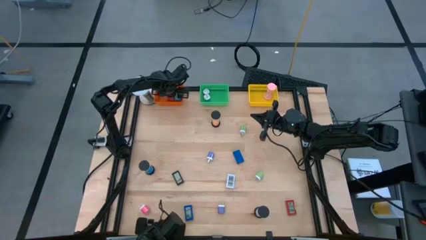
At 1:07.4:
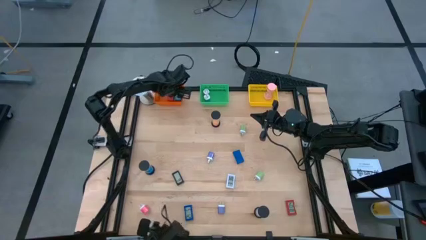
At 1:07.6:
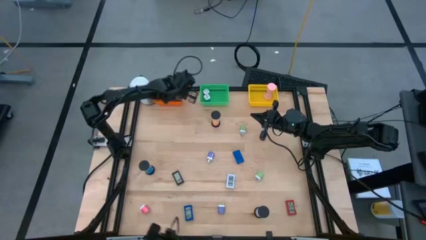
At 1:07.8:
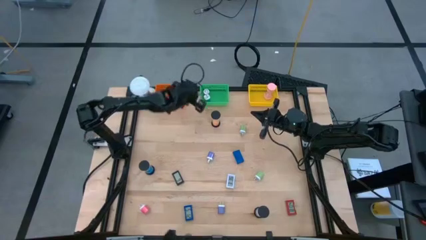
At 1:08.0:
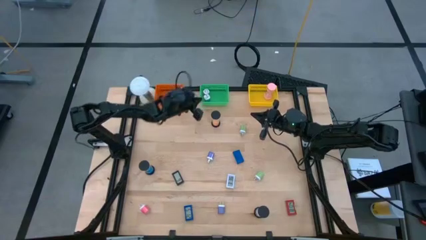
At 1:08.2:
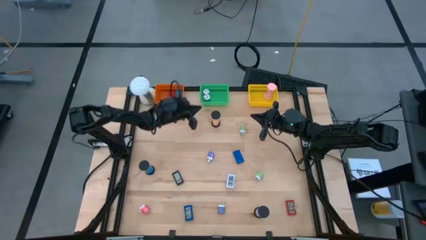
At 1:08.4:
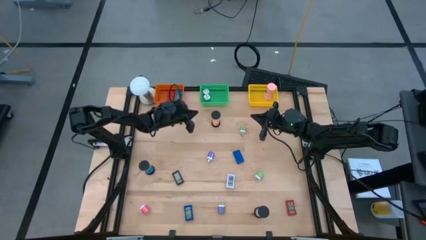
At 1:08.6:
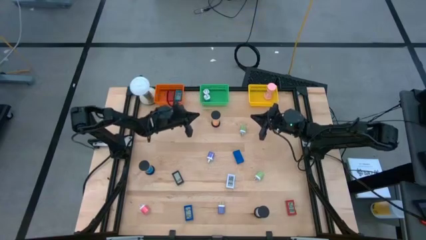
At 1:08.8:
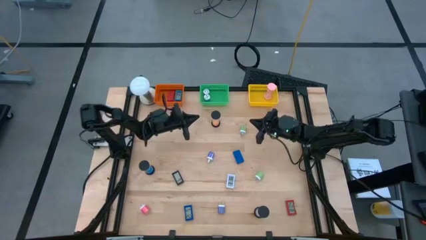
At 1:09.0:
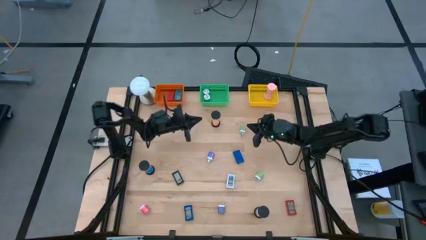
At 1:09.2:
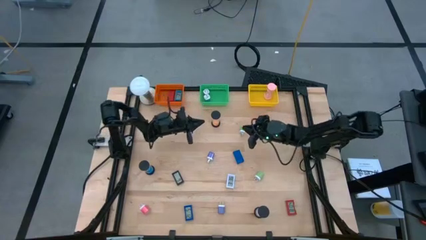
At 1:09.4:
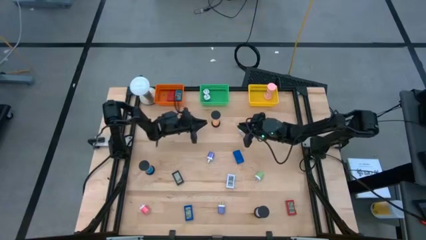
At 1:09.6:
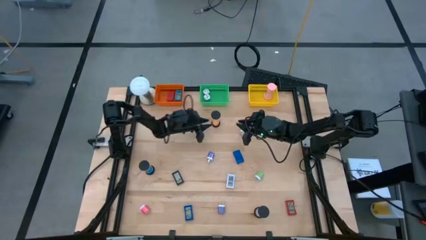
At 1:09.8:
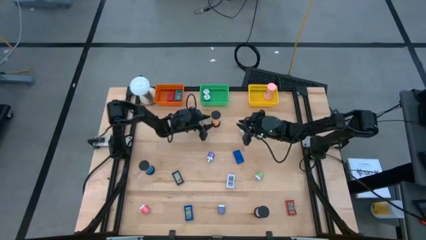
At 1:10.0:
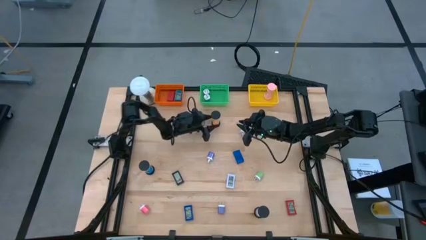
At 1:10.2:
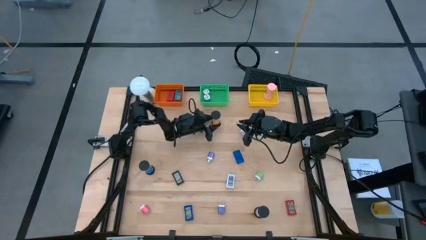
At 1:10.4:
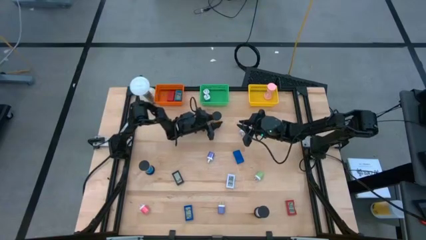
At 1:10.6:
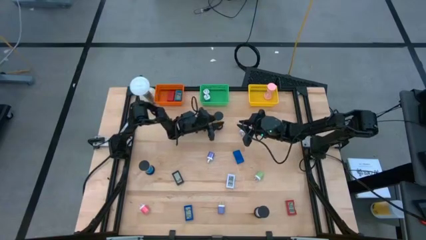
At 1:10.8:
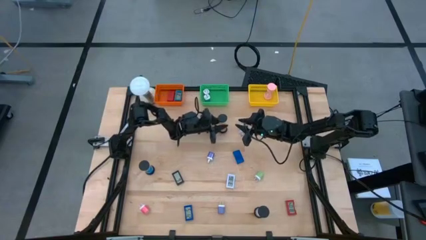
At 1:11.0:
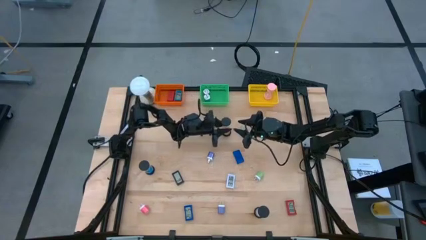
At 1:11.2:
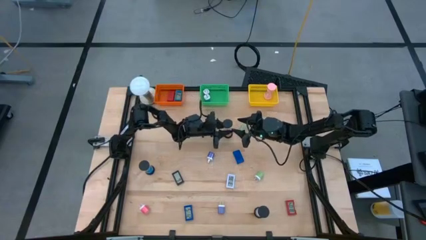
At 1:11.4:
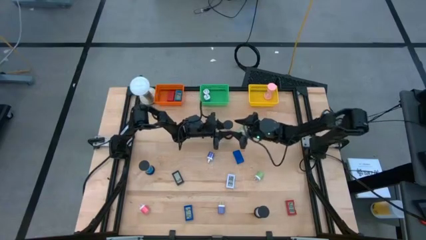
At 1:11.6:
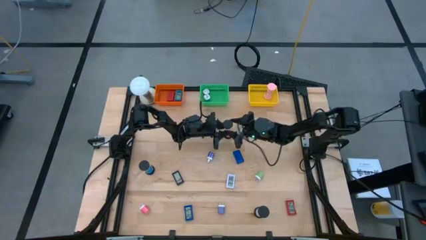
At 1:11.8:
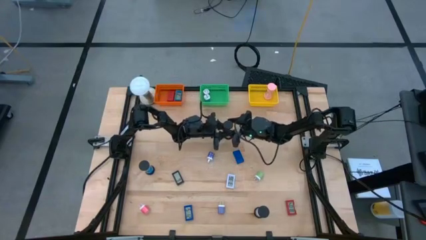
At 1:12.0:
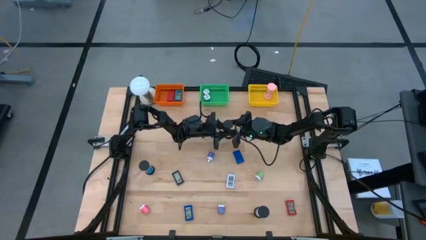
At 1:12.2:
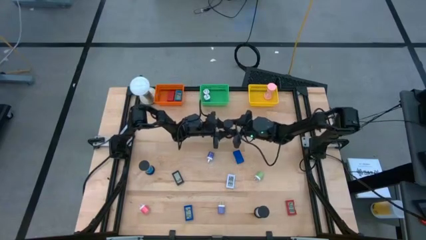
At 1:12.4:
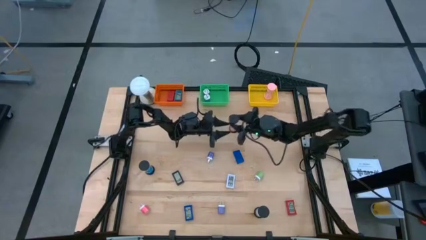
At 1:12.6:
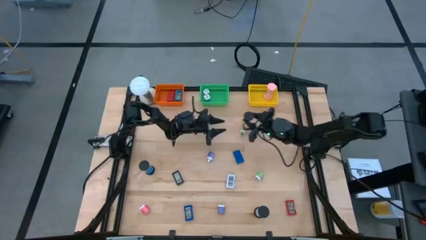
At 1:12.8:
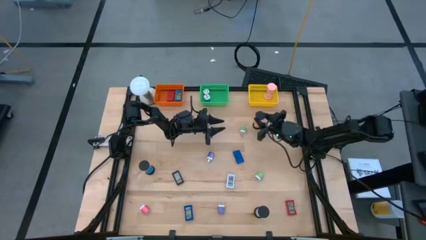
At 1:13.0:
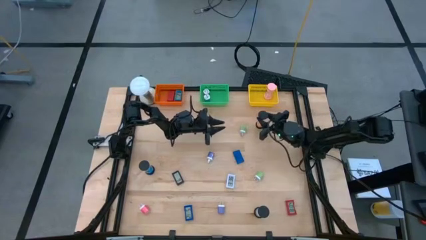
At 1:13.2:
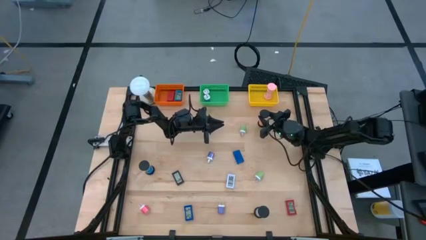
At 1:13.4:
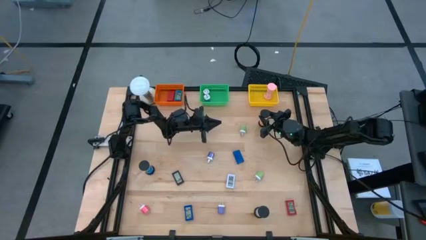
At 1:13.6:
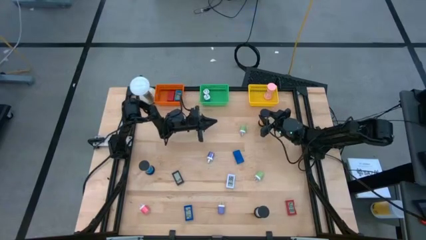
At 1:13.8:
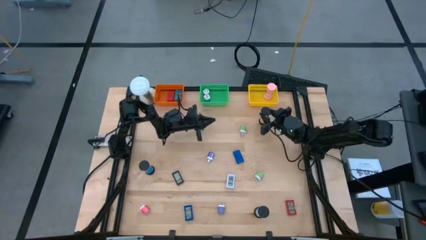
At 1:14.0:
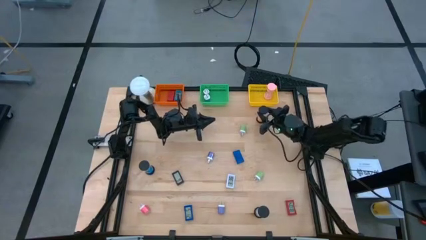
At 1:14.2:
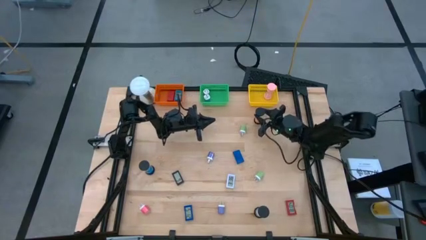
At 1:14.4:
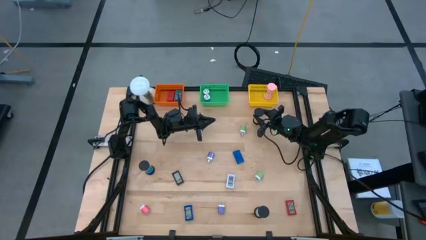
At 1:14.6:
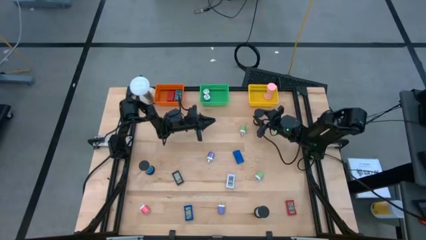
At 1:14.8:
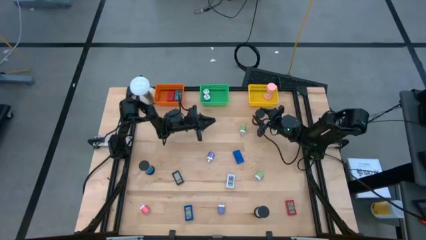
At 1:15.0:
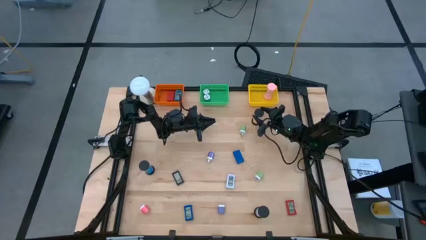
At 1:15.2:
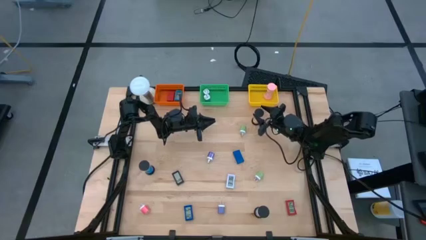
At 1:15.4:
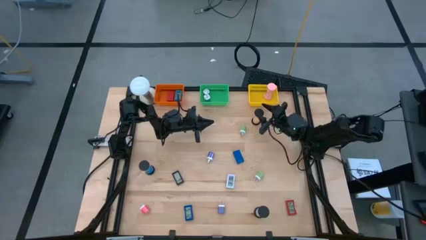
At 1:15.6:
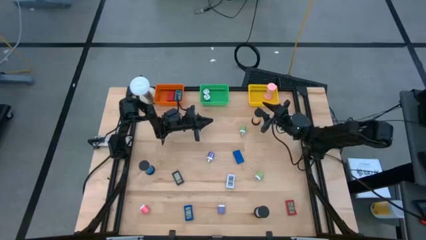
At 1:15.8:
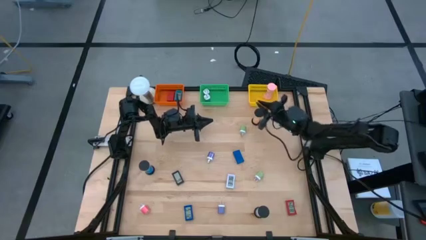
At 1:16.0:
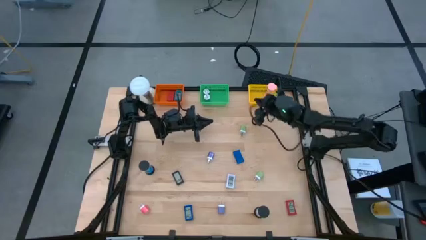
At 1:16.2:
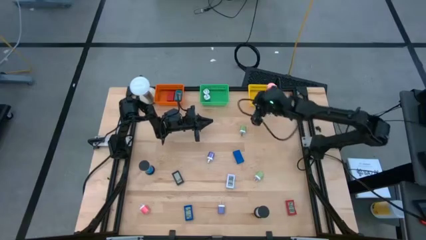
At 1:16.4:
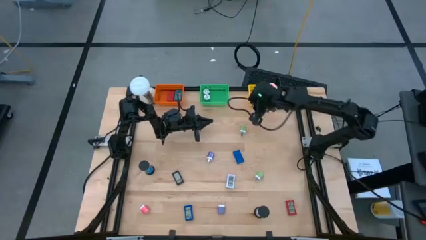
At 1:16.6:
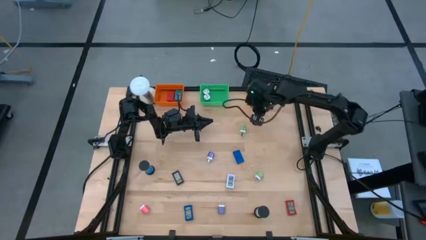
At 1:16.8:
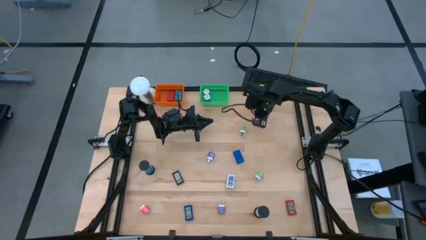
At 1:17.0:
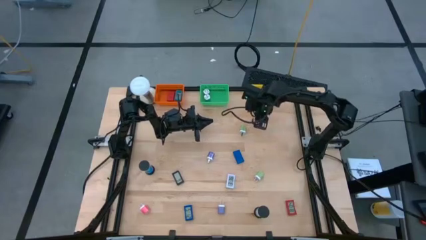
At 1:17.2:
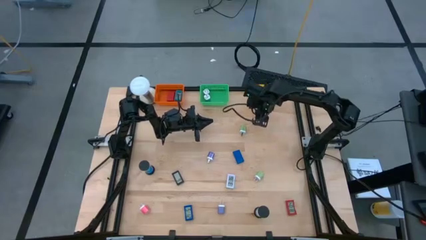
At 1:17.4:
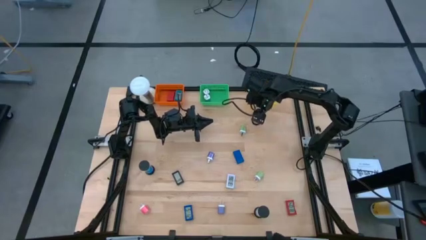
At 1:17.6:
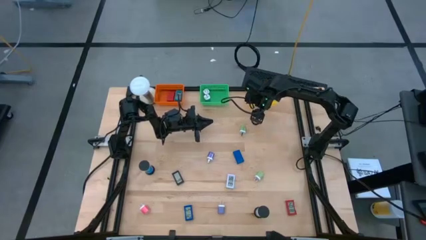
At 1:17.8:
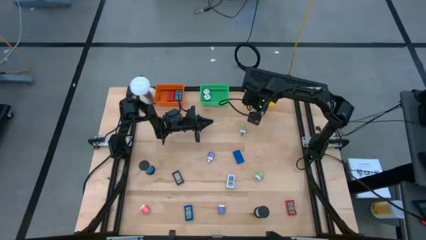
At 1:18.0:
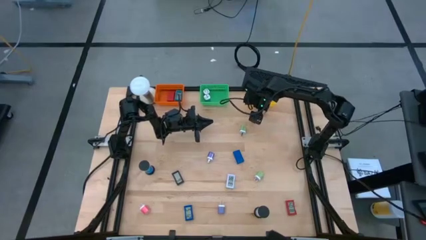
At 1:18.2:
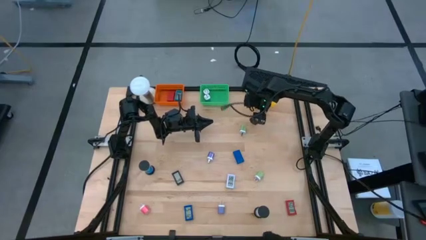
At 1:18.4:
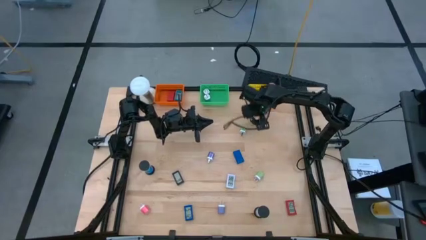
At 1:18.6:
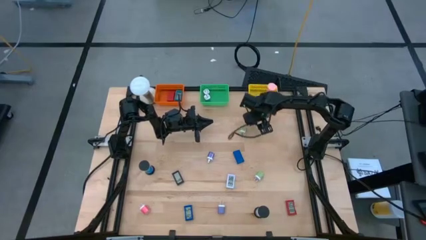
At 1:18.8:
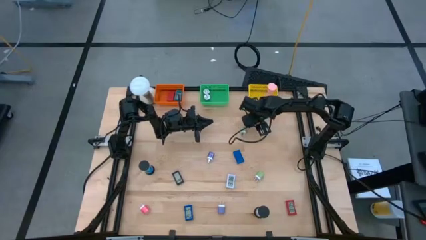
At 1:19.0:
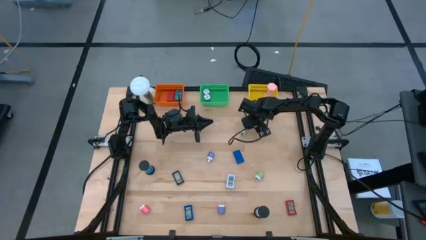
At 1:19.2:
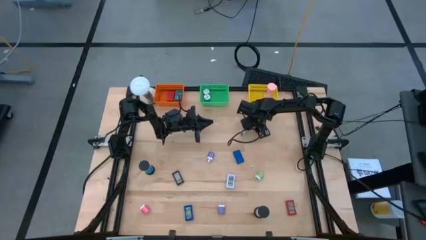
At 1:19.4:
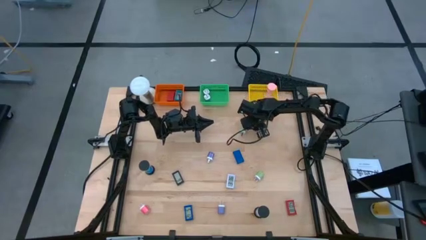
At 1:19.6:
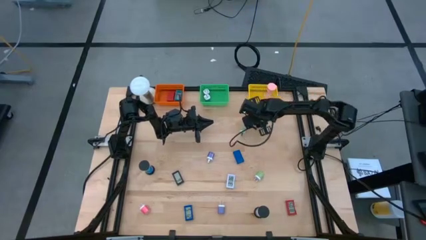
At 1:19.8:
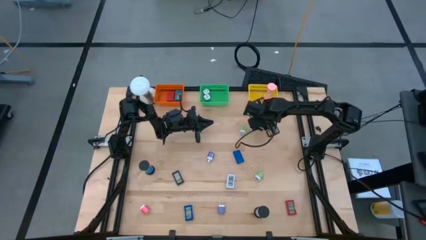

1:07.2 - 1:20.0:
Task: Pick & Place Office items
Put the orange hourglass into the yellow basket
